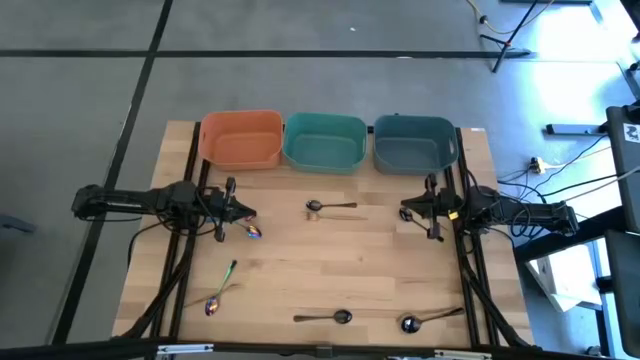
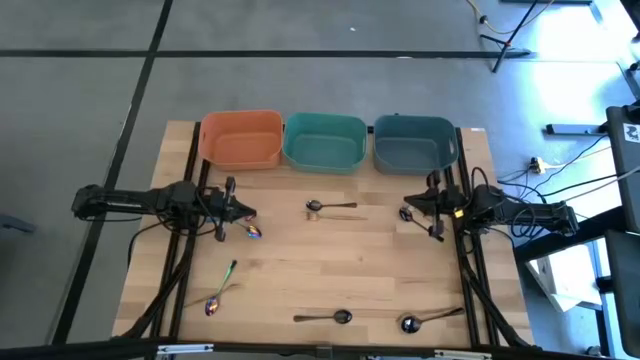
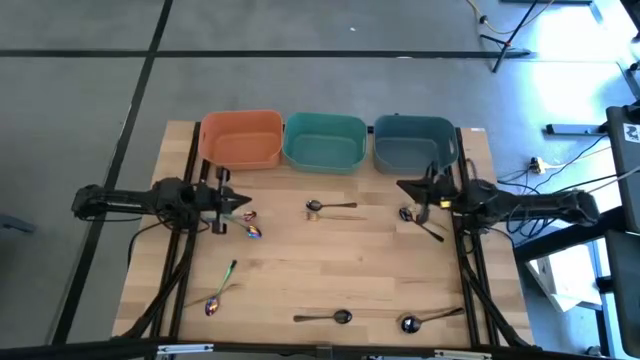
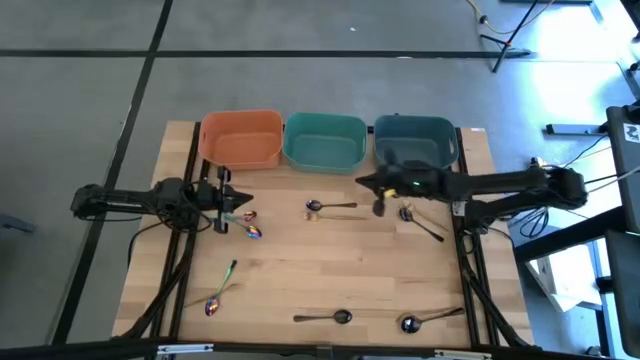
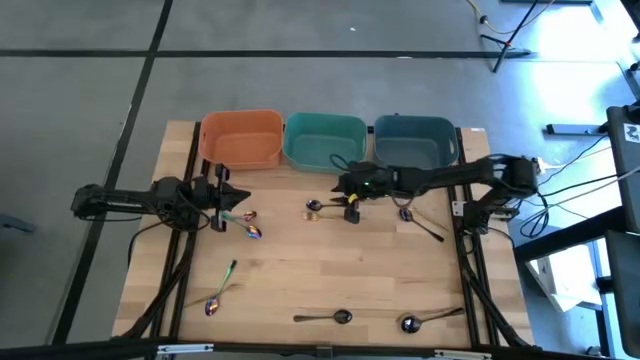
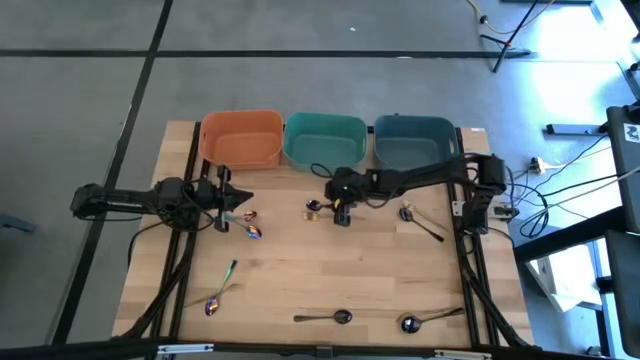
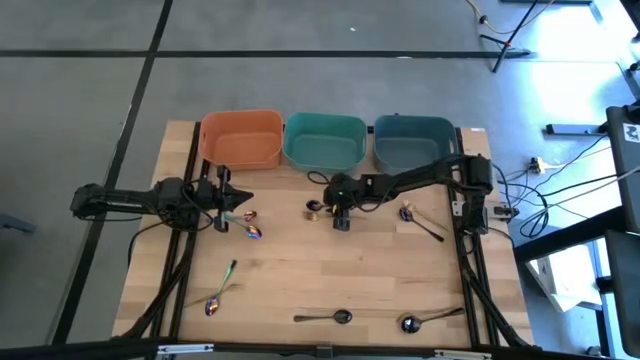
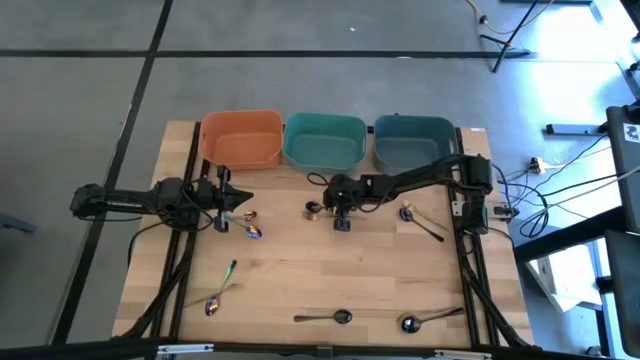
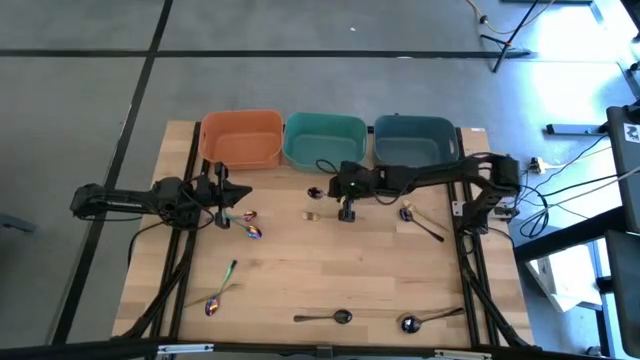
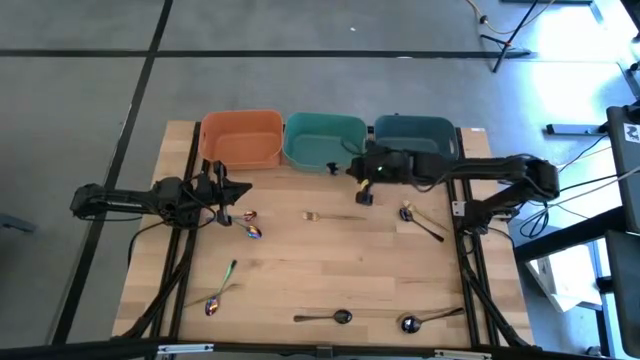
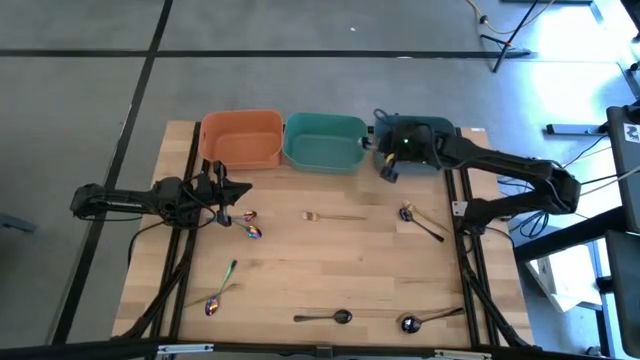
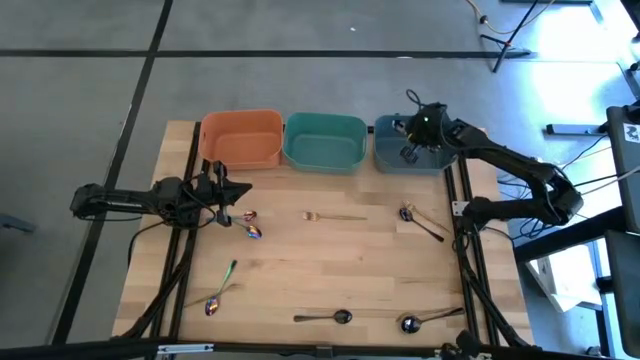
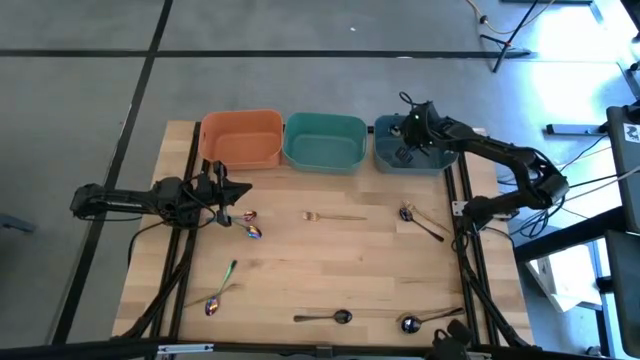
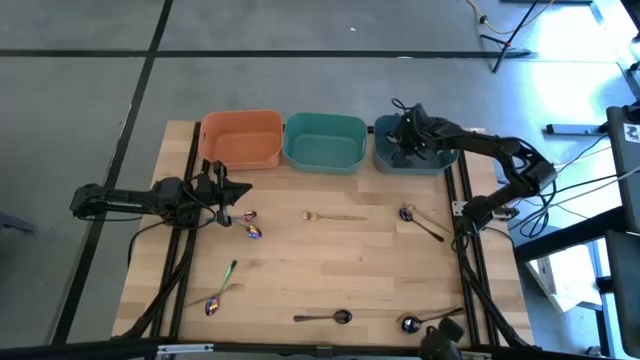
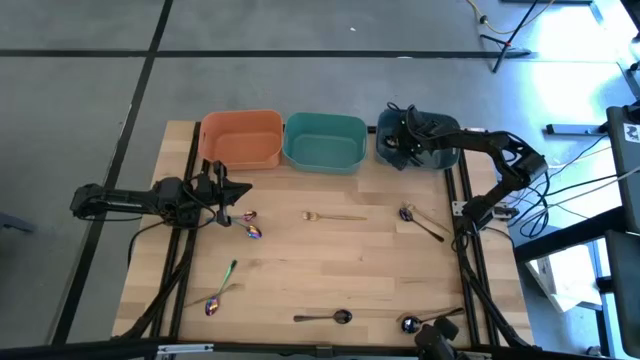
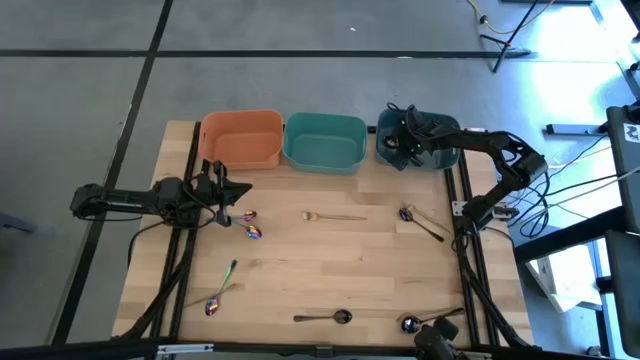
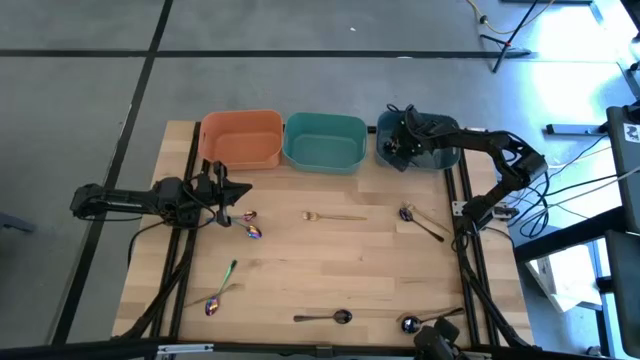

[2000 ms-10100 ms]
Task: Sort silverware by color (type)
Put the black spoon into the blue bin

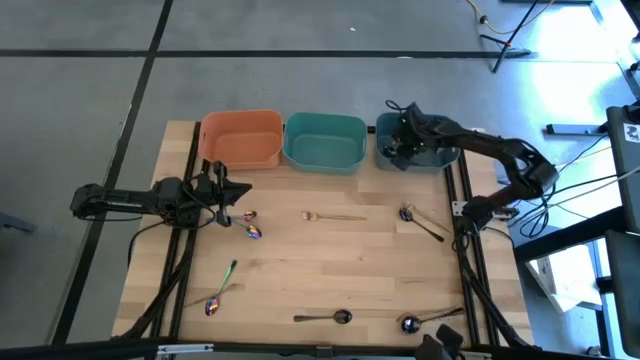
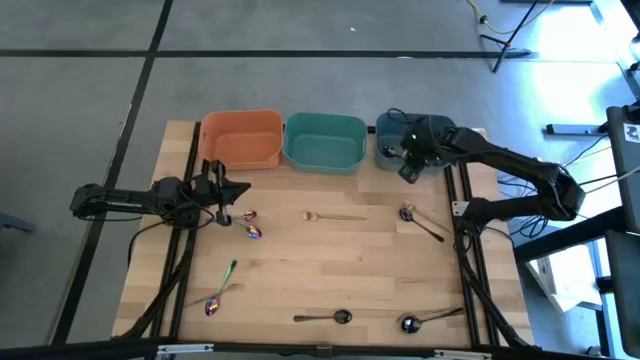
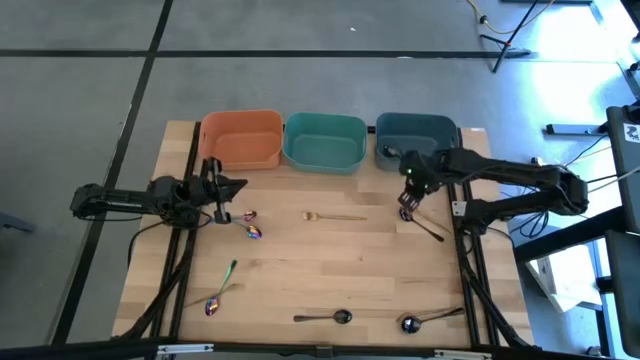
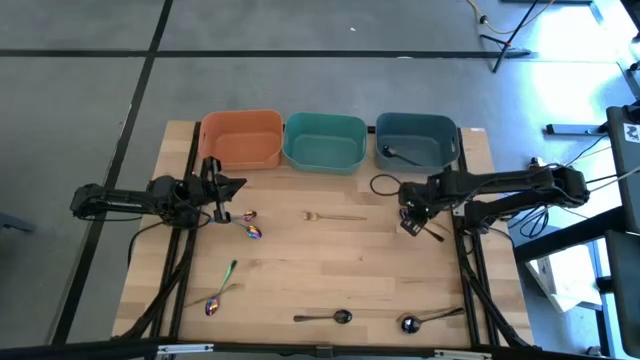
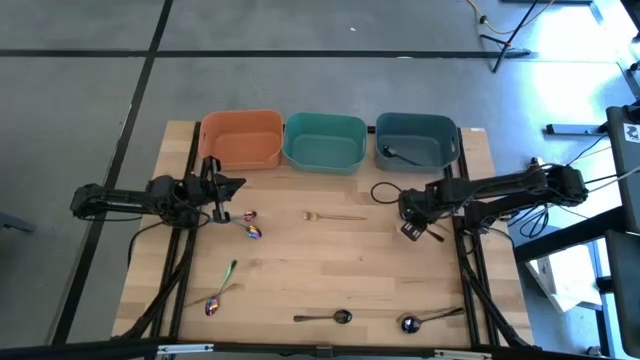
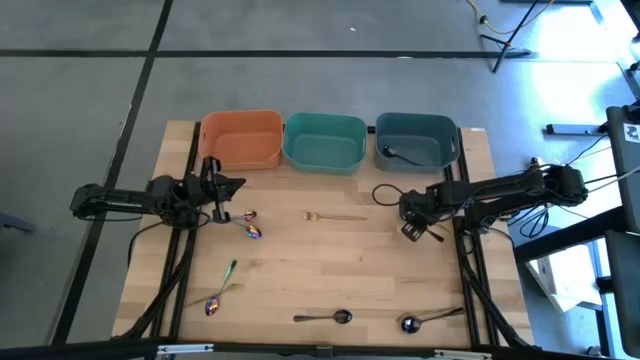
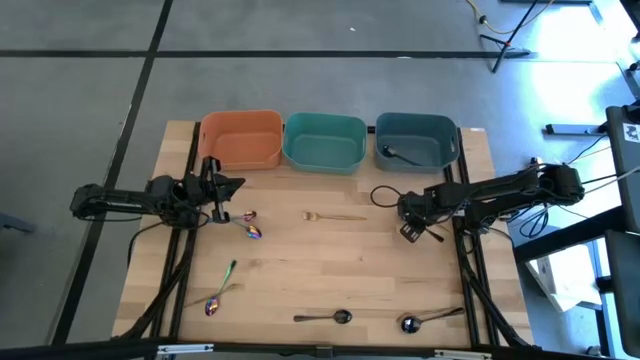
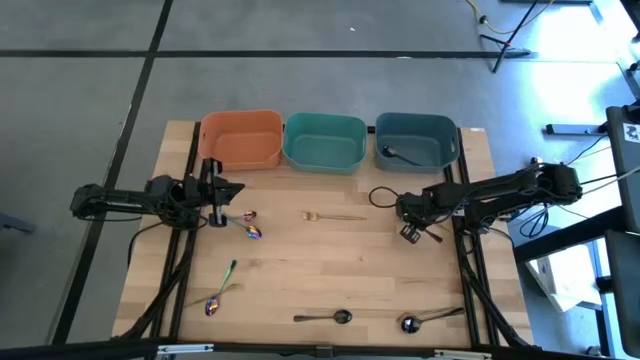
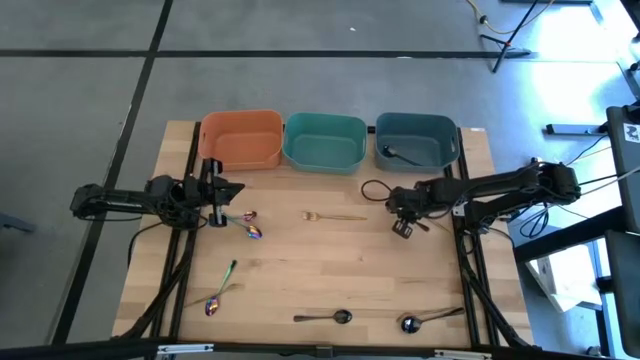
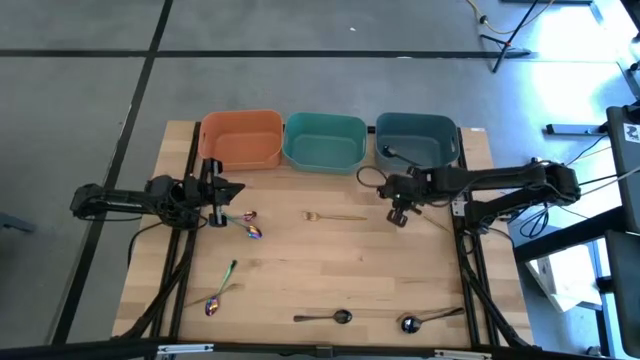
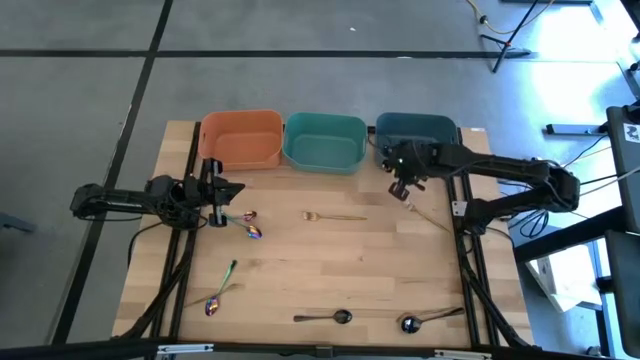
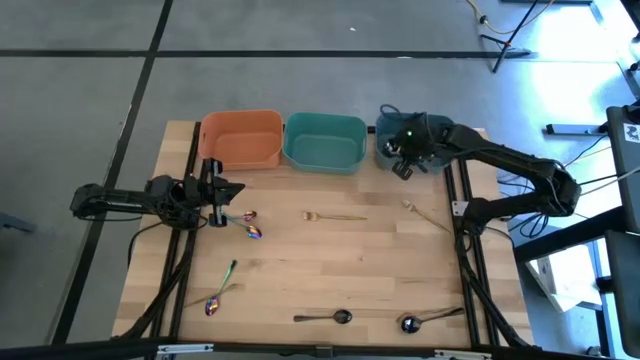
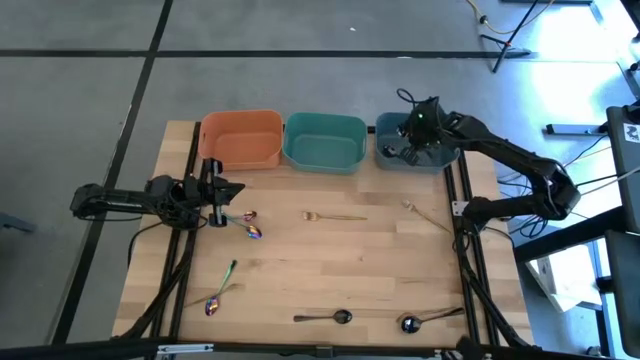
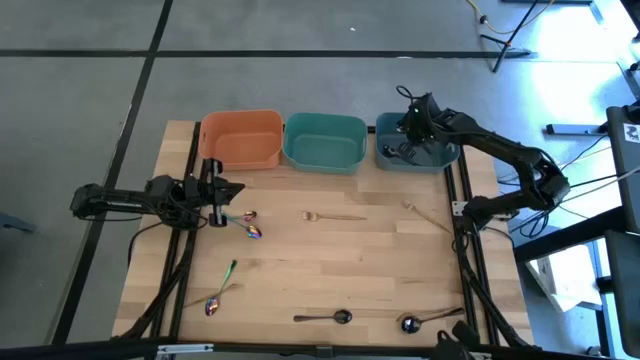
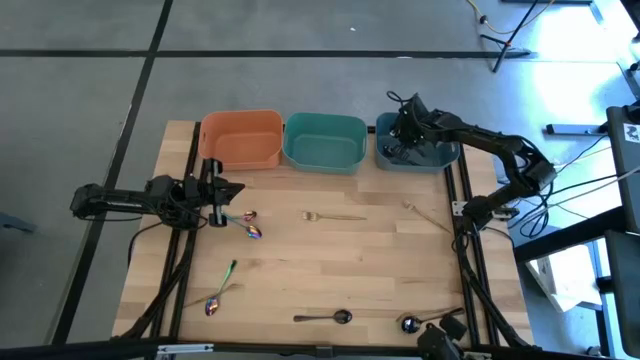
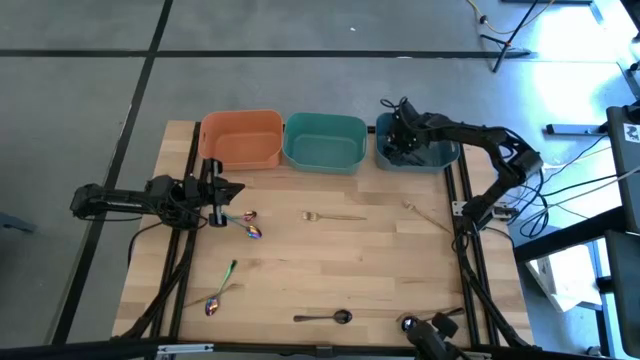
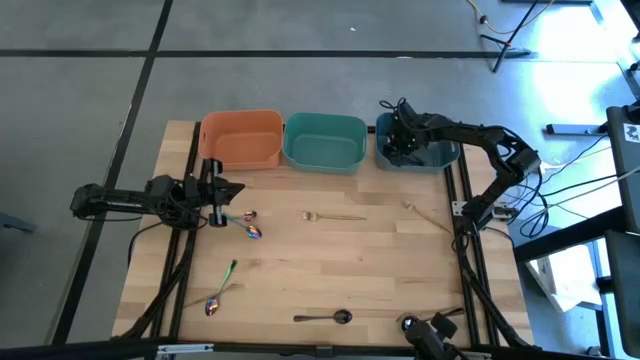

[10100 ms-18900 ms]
Put the black spoon into the blue bin

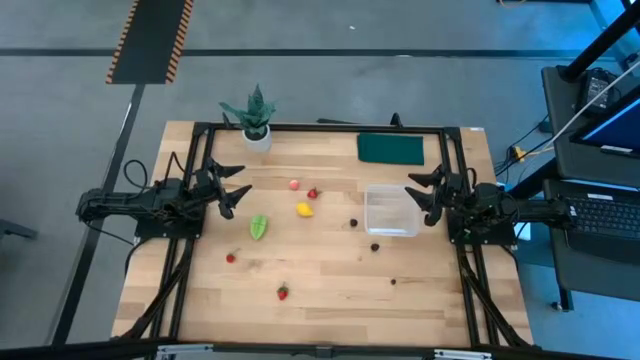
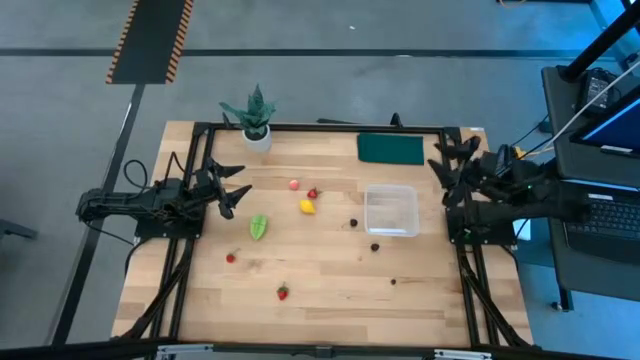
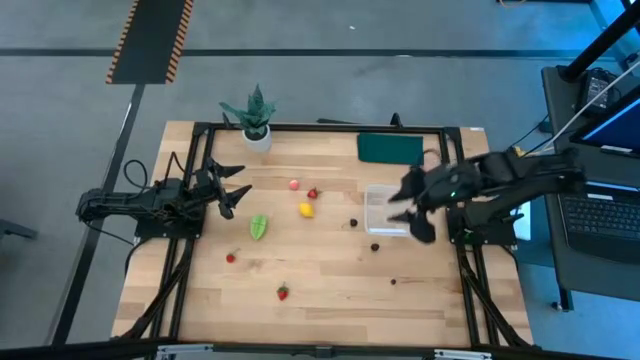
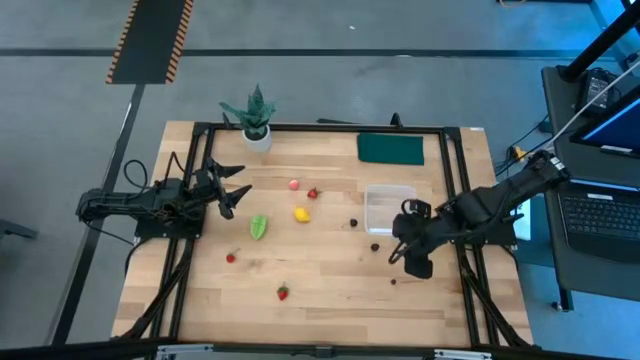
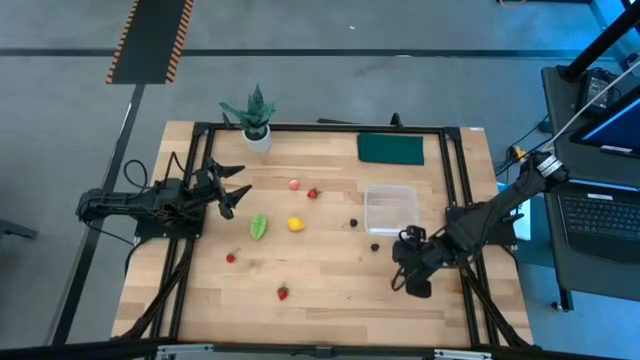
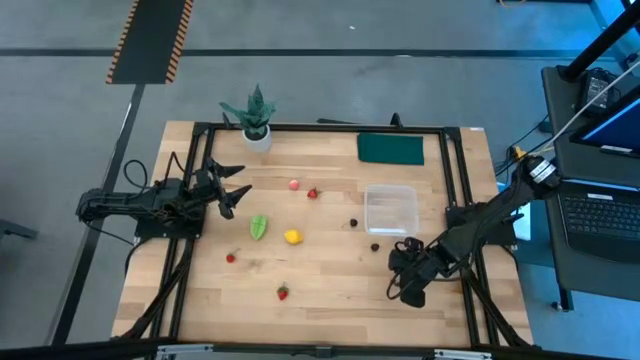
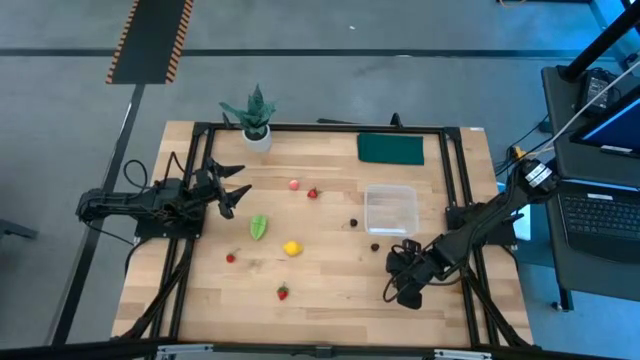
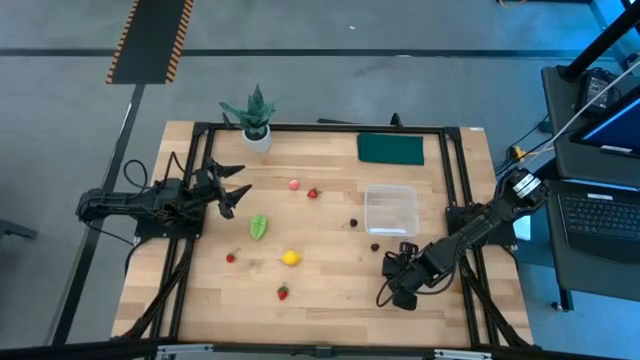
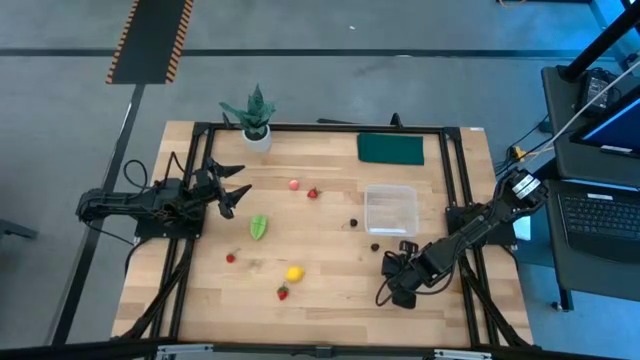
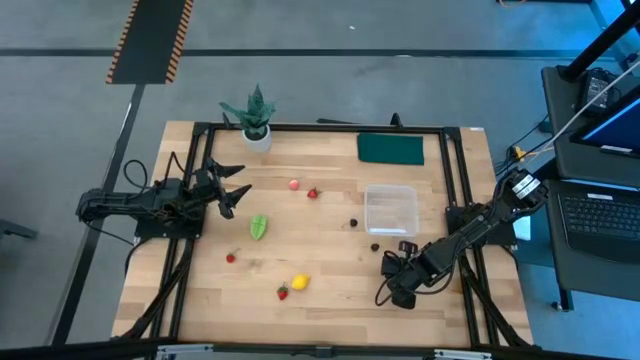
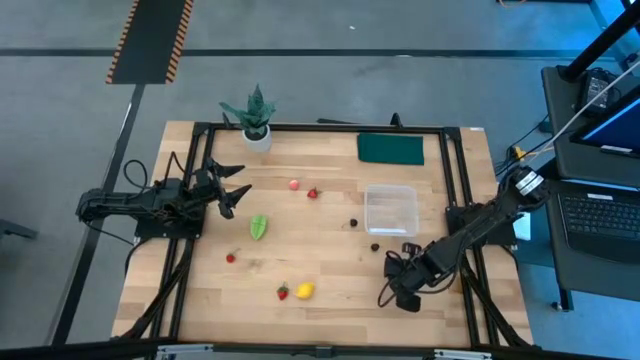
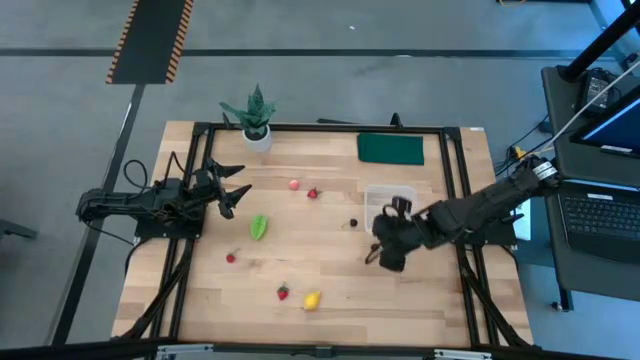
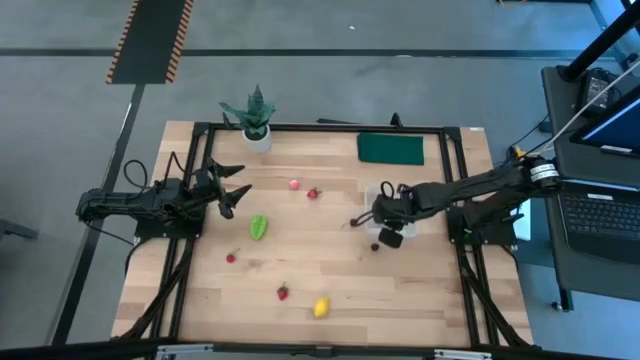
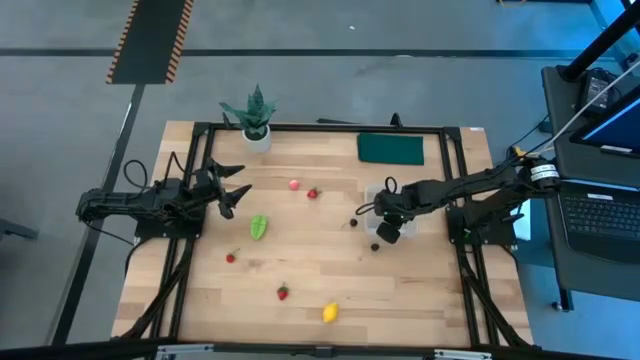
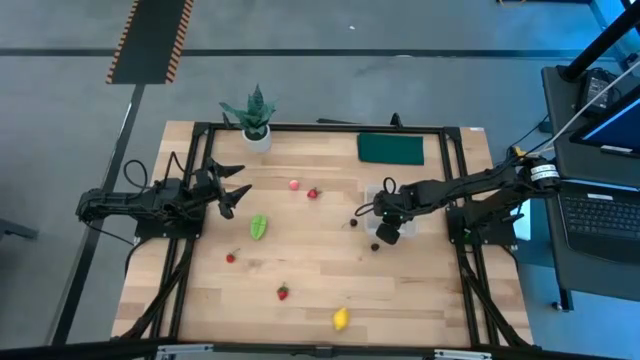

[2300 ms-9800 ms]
Task: Pick and placing Produce into tupperware
Put the blueberry into the transparent container
